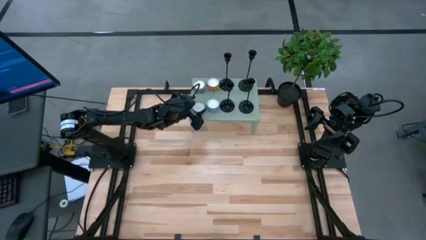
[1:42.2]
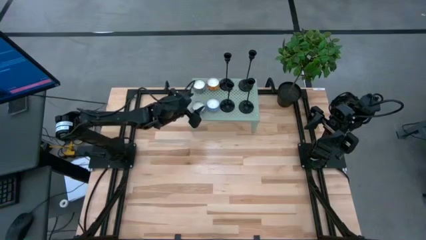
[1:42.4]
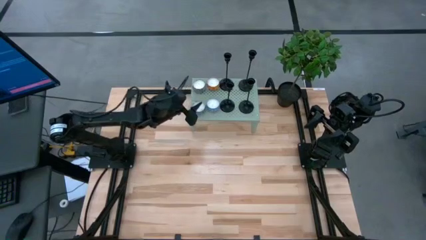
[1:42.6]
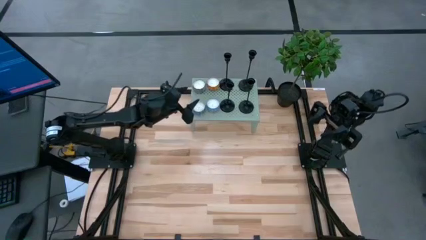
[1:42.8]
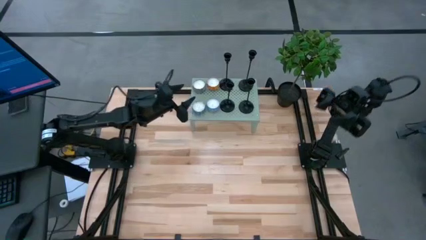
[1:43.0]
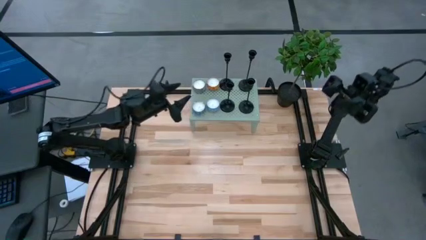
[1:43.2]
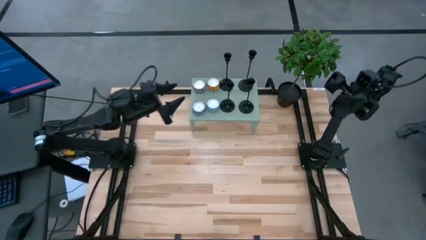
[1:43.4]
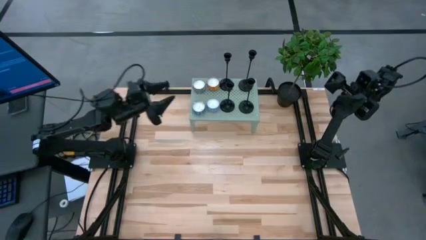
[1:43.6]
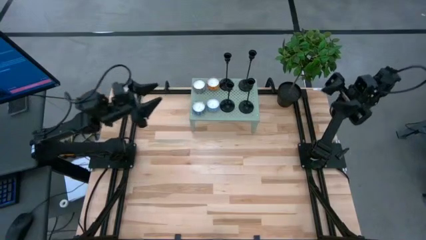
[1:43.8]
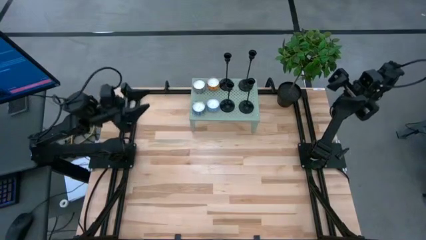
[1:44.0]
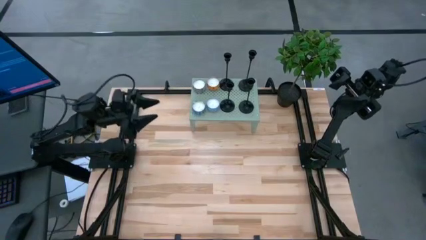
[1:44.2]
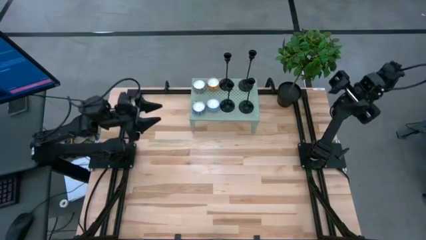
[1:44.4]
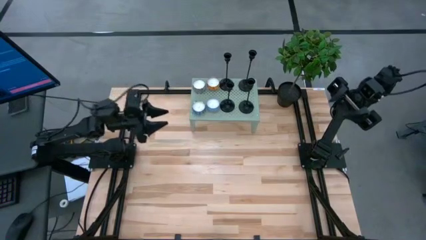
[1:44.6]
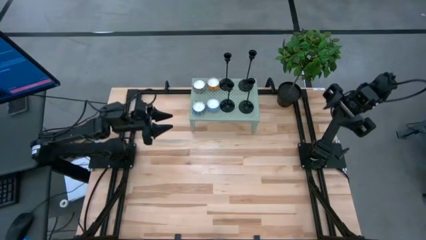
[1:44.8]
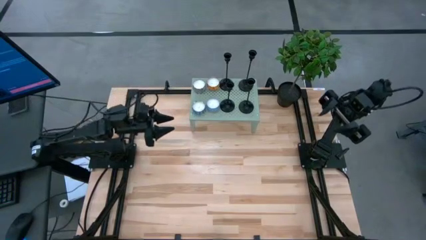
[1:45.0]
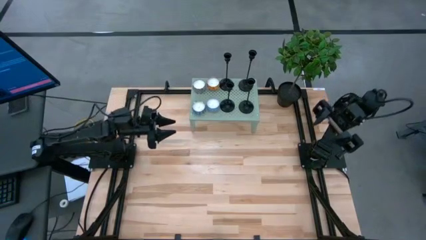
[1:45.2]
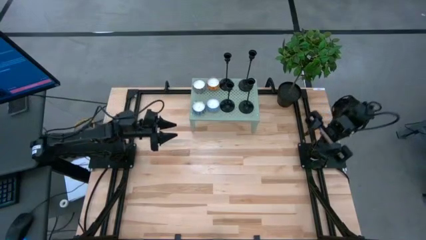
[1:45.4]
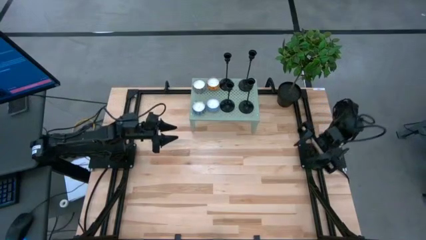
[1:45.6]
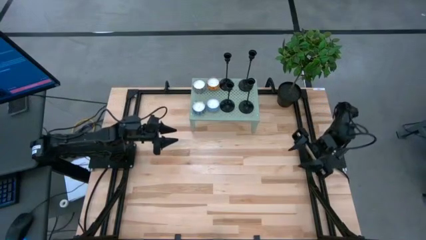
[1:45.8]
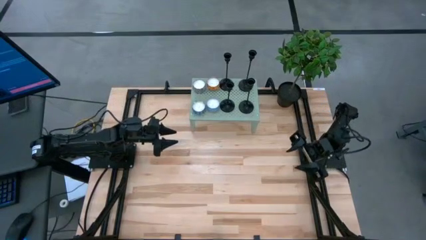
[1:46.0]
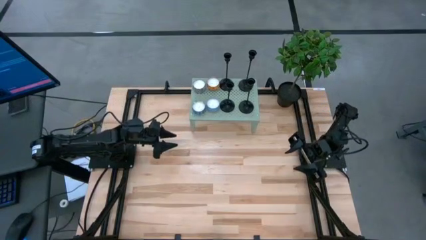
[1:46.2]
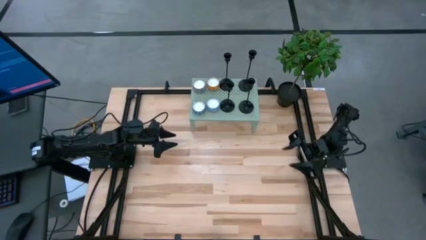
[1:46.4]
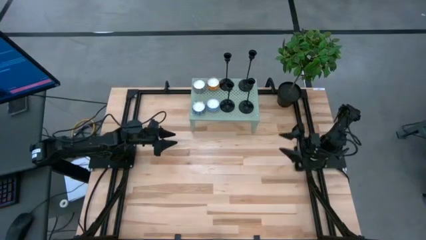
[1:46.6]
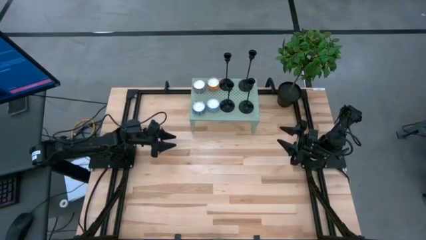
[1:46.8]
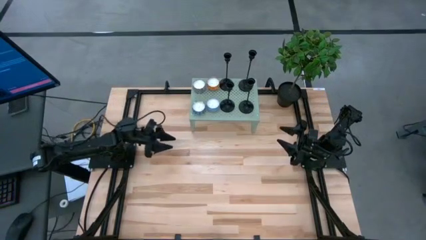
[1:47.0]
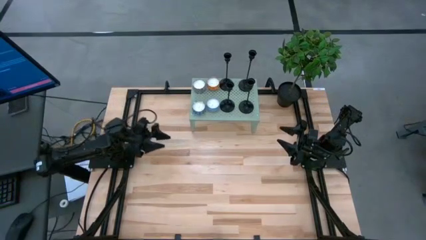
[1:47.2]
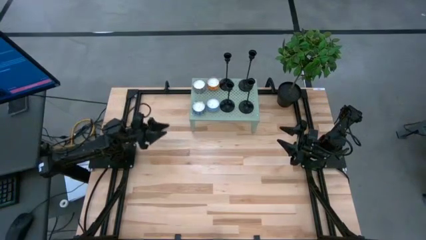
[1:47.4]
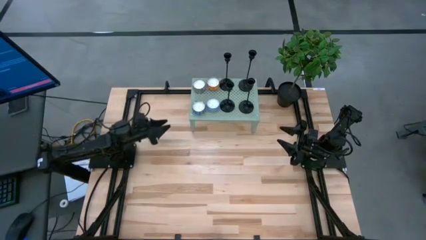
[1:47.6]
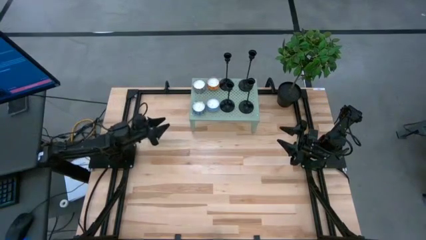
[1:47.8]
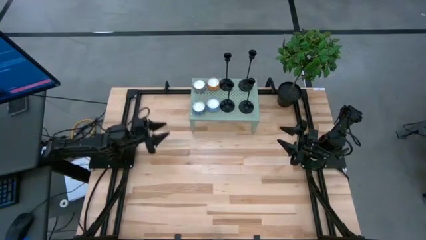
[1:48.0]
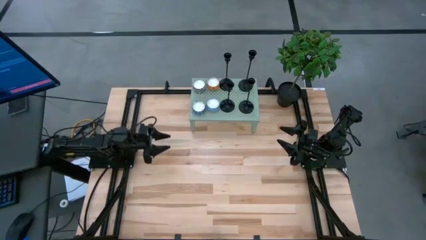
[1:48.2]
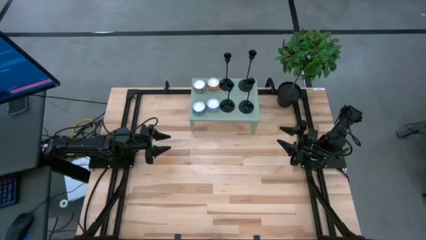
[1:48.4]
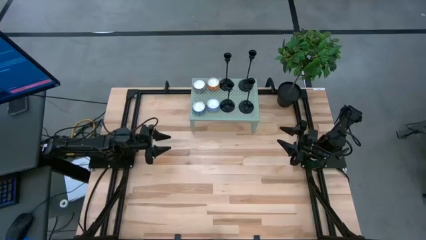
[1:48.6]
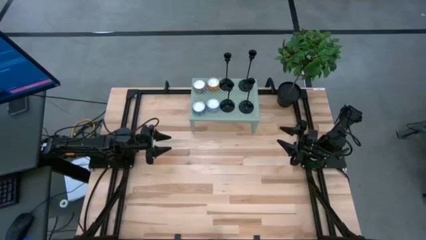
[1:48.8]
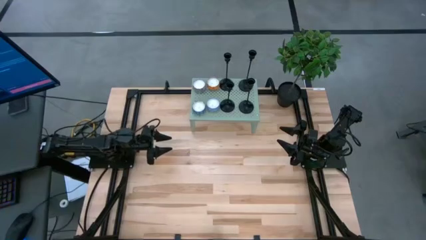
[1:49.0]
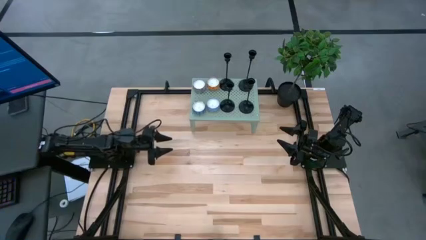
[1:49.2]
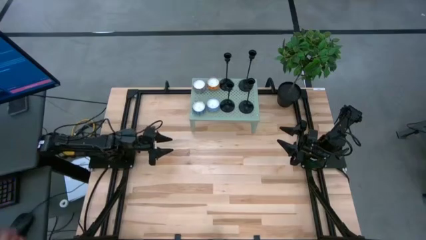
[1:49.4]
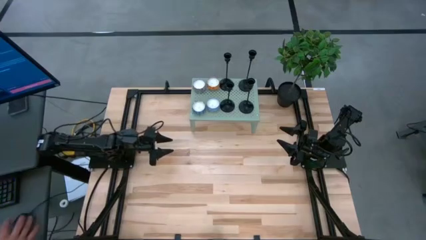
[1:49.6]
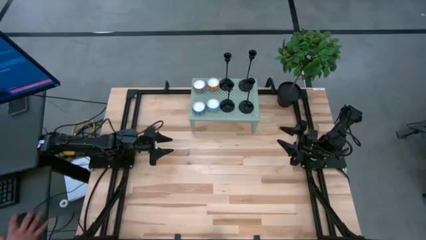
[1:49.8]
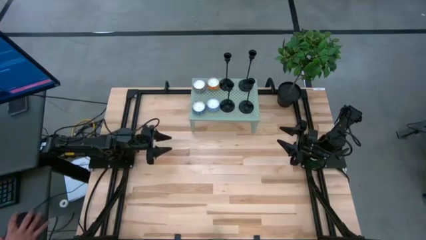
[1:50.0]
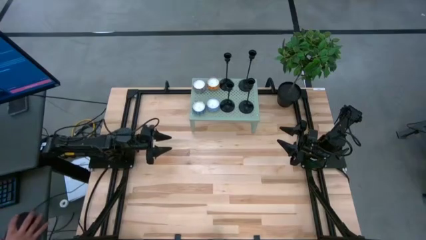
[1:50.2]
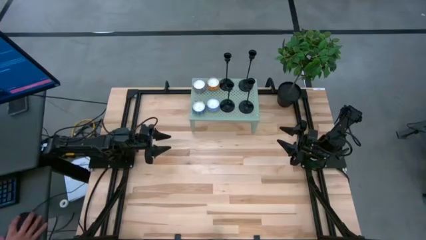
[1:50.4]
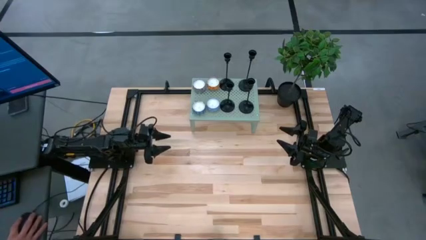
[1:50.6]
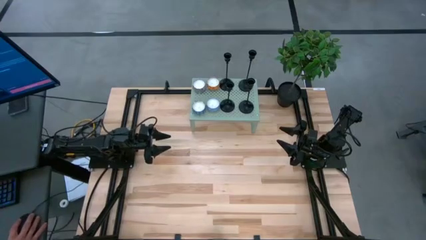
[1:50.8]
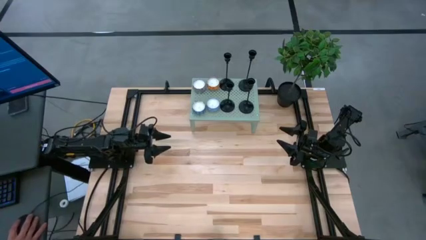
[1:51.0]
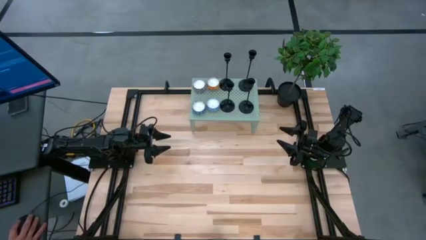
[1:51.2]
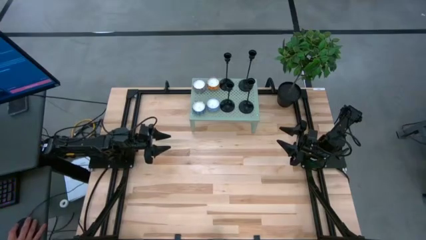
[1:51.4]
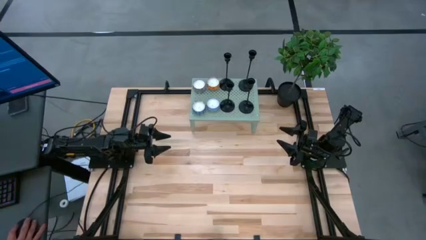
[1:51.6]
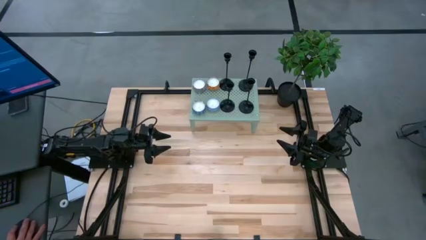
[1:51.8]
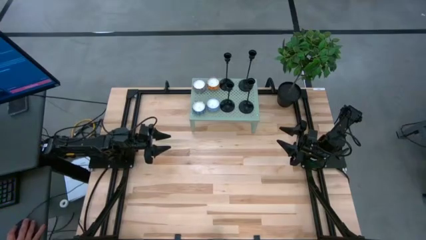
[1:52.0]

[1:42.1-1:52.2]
Task: Pick & Place candle stick holders
Return to Home Position

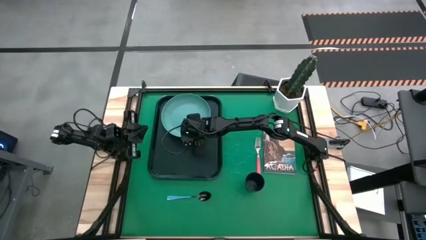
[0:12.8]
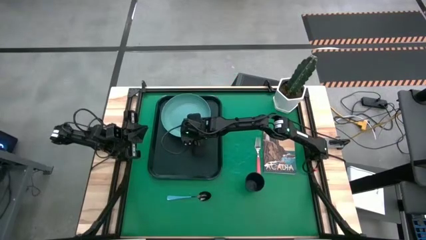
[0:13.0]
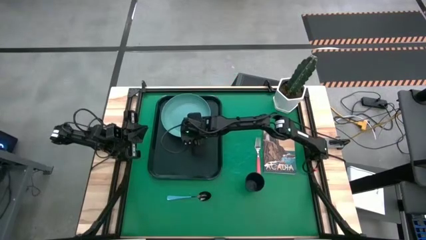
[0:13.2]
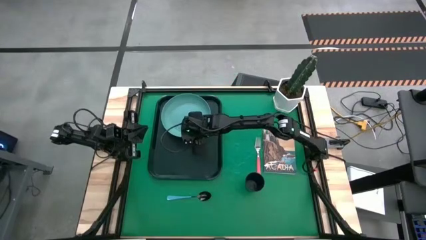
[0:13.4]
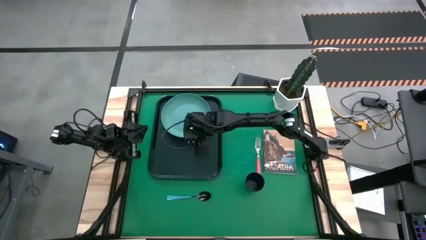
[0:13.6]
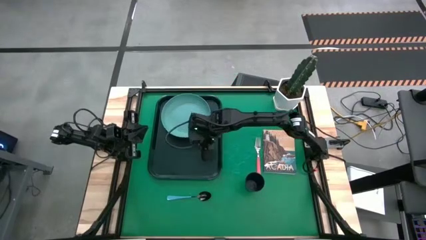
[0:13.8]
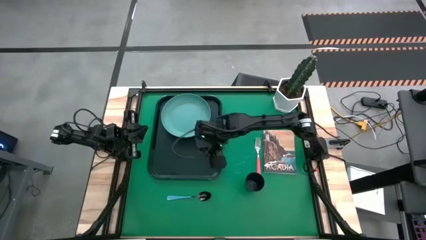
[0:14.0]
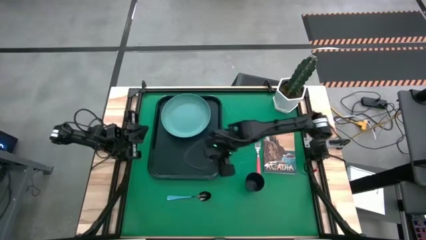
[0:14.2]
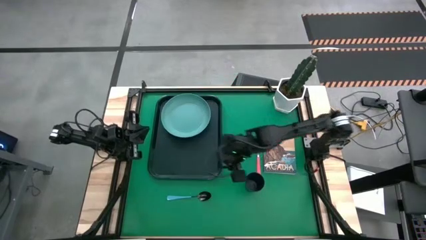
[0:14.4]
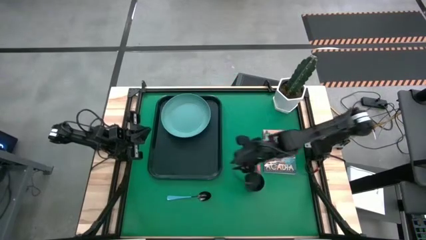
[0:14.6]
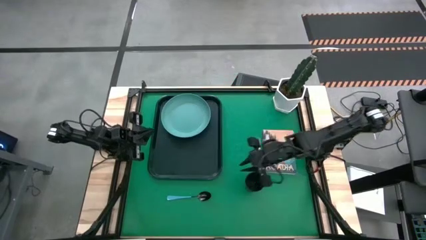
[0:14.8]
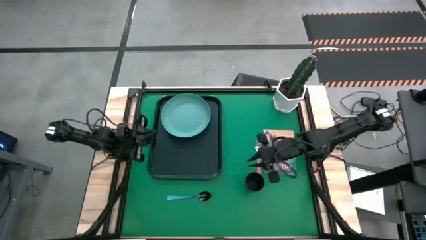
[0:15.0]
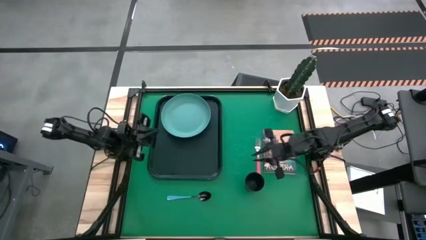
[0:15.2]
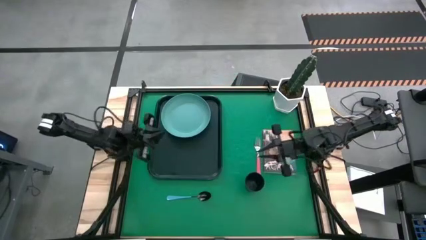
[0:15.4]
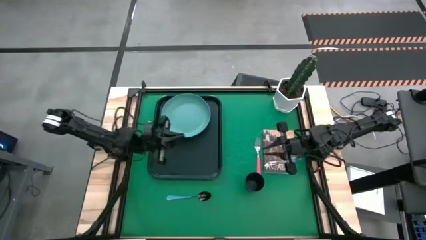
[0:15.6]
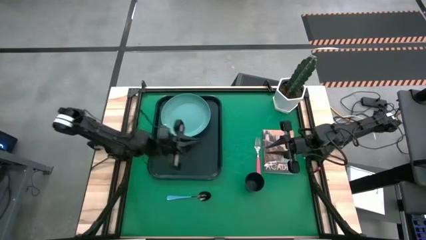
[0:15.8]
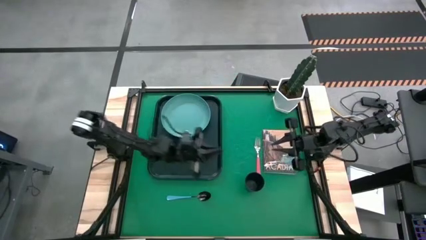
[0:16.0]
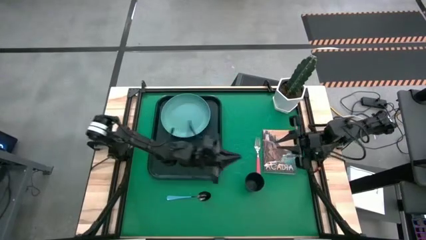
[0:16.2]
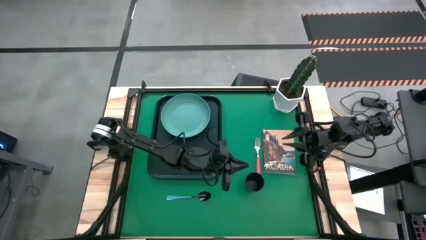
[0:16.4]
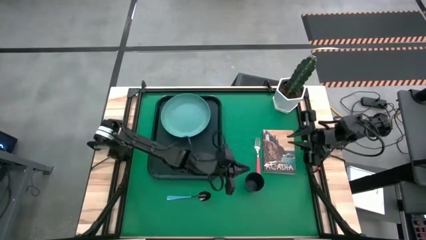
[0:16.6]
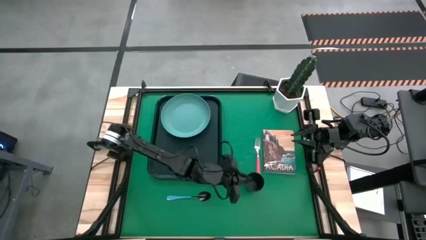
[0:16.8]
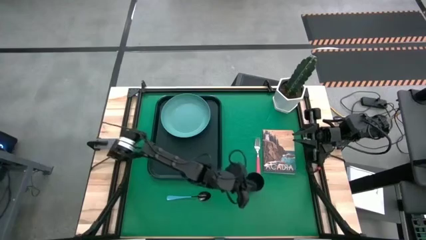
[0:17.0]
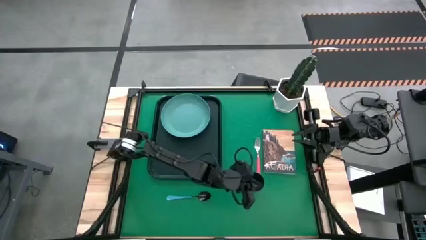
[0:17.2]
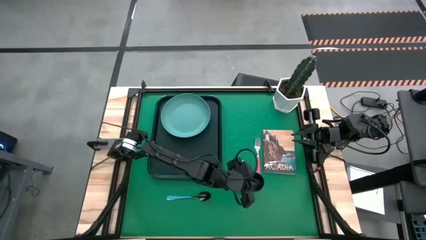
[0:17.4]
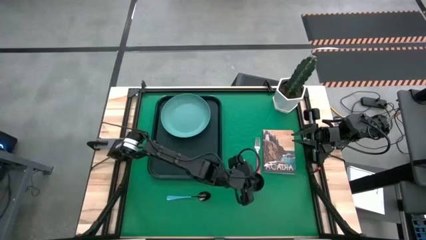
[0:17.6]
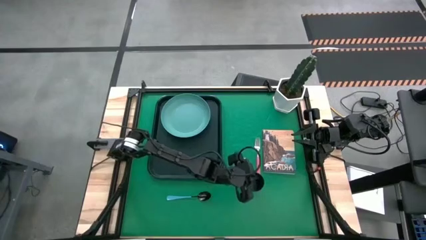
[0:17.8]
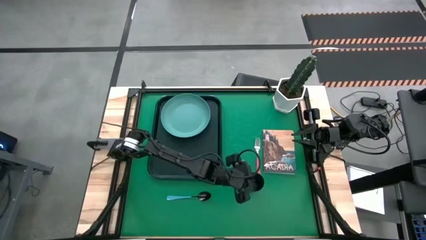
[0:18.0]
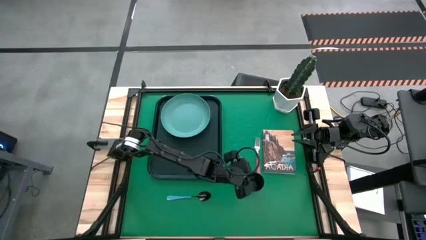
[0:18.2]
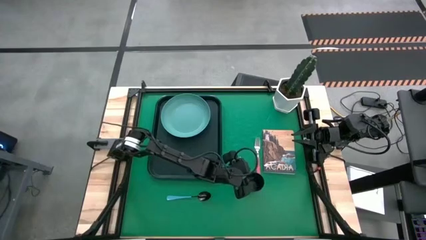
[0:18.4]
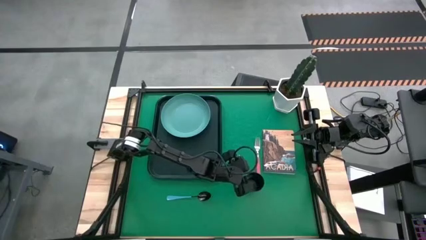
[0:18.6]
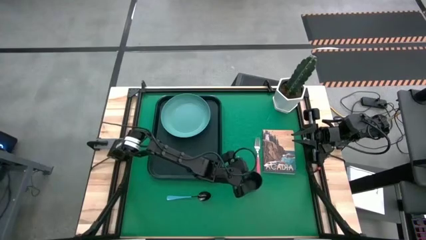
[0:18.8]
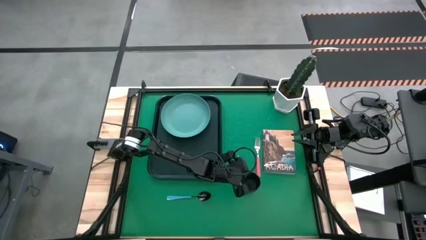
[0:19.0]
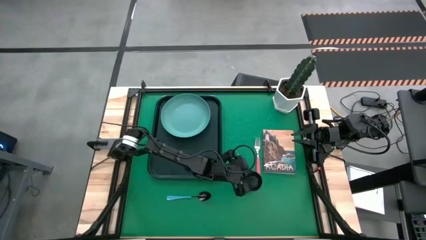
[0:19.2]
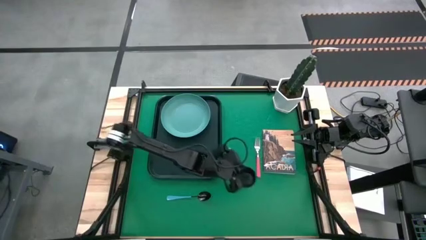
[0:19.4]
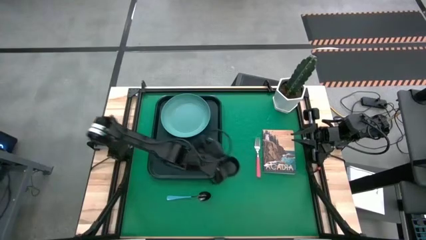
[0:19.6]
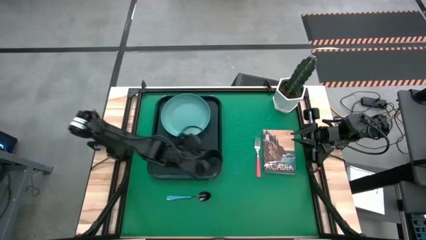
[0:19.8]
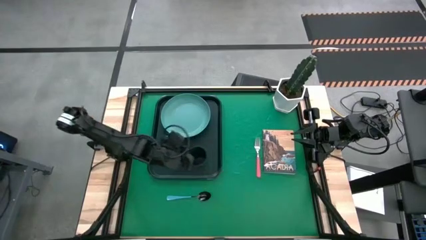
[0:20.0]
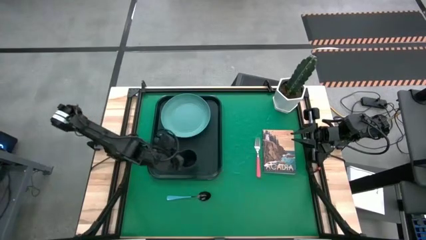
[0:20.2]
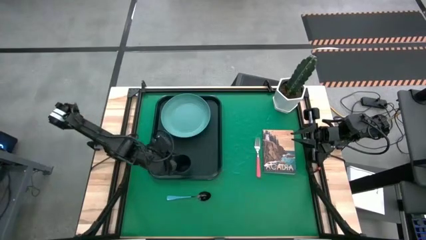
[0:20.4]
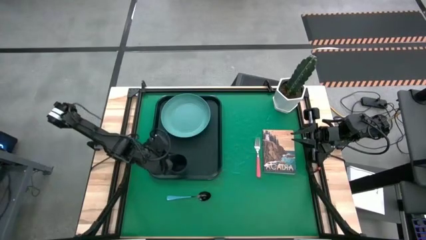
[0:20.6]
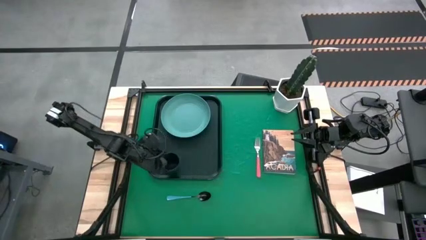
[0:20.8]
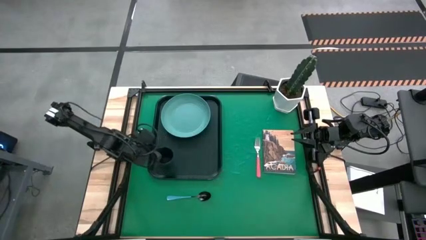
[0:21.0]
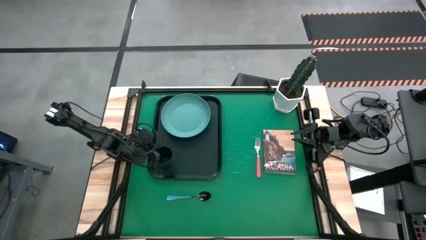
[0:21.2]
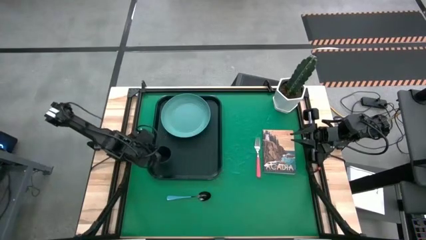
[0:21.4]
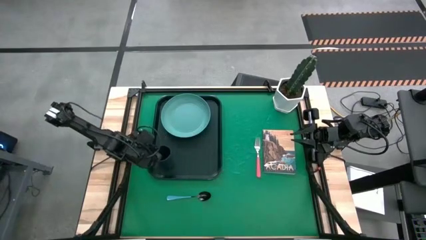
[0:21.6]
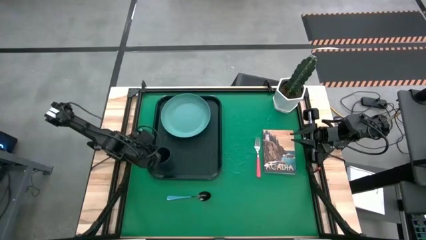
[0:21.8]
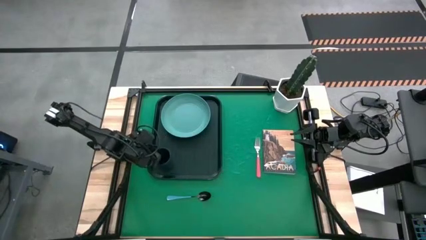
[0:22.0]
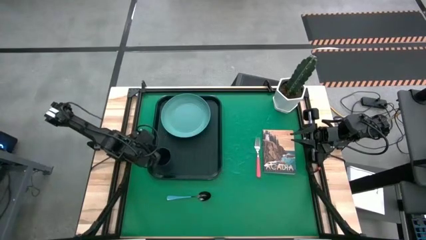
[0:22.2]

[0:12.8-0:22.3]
Task: Pick and place plate/cup/fork/spoon on tray
Put the blue cup on the black serving tray to the bottom left of the green plate
